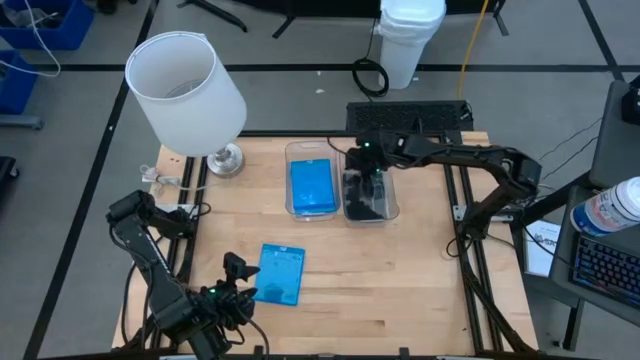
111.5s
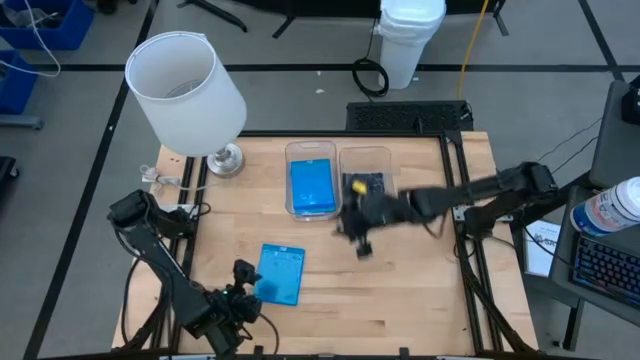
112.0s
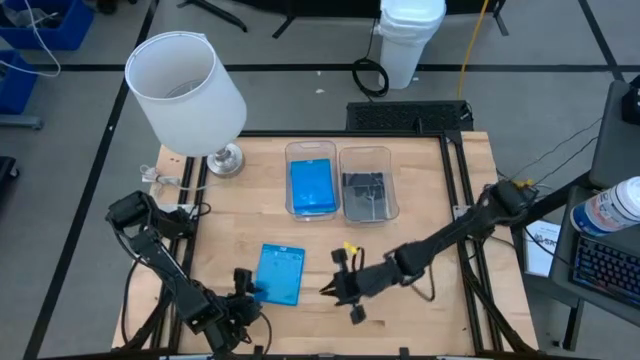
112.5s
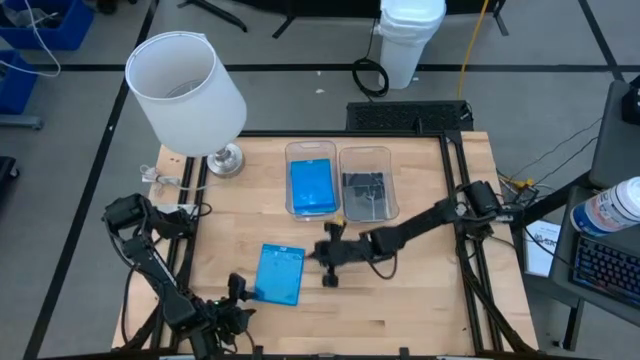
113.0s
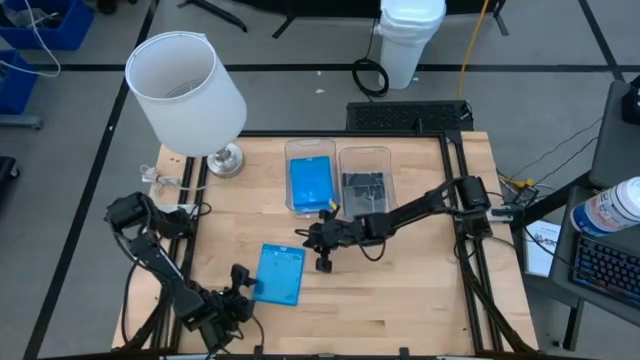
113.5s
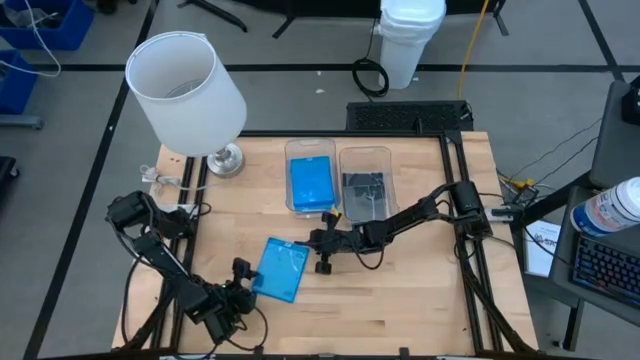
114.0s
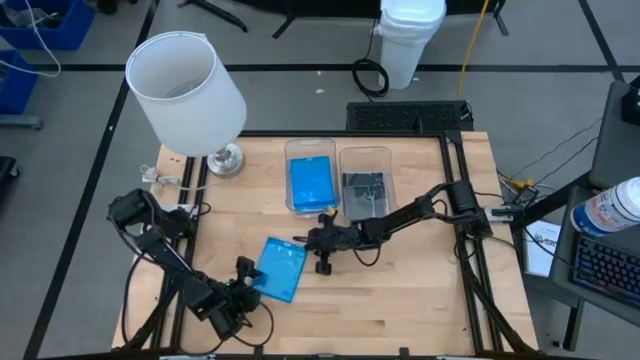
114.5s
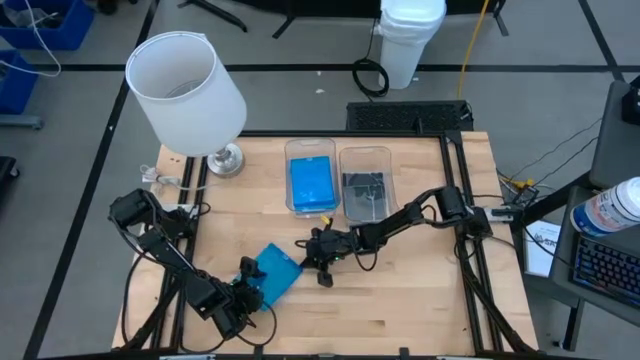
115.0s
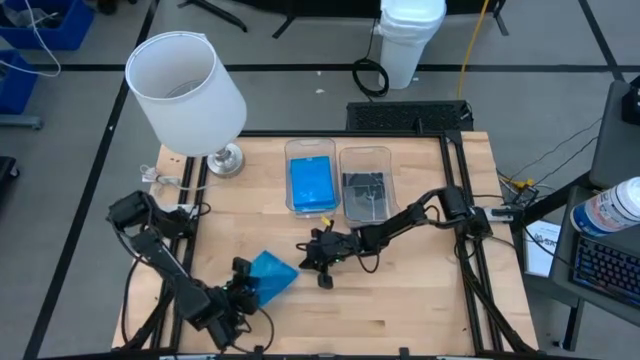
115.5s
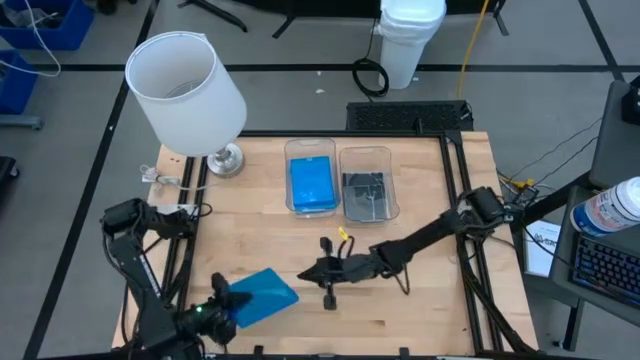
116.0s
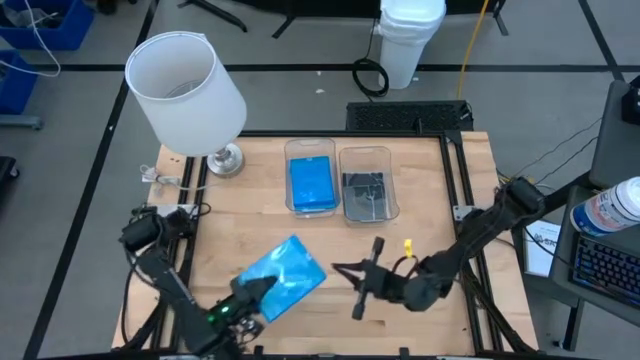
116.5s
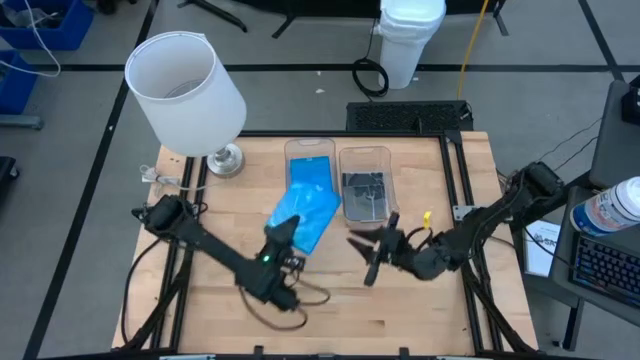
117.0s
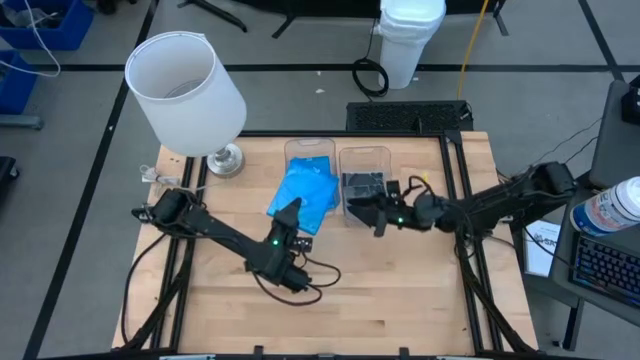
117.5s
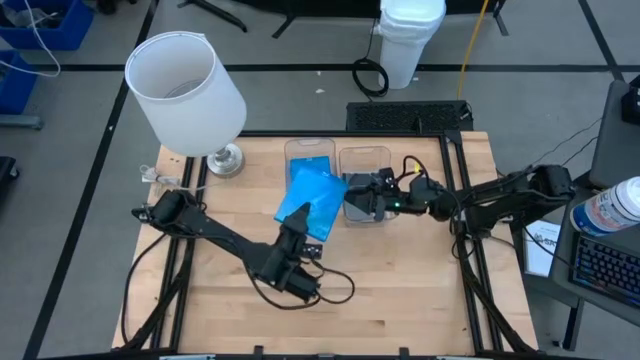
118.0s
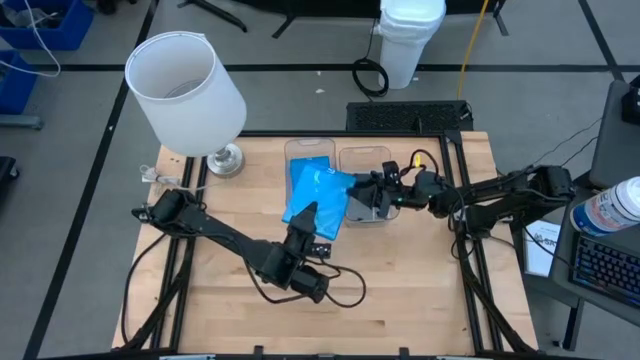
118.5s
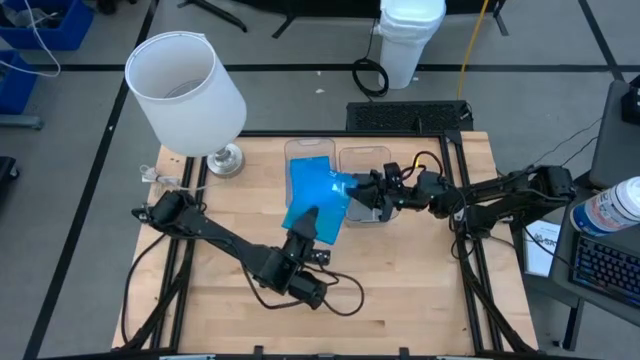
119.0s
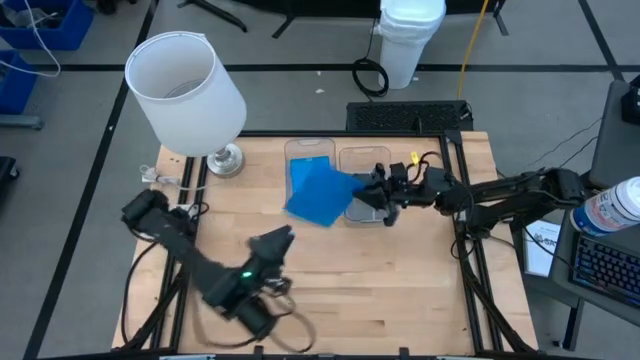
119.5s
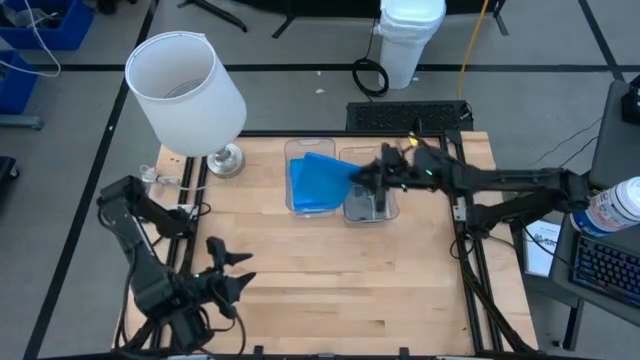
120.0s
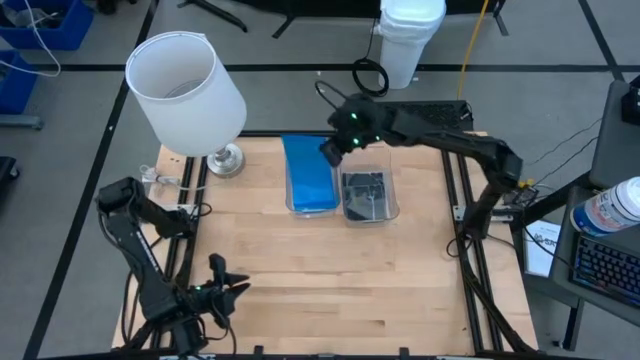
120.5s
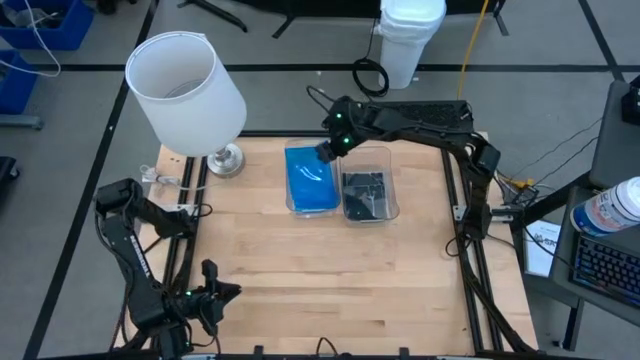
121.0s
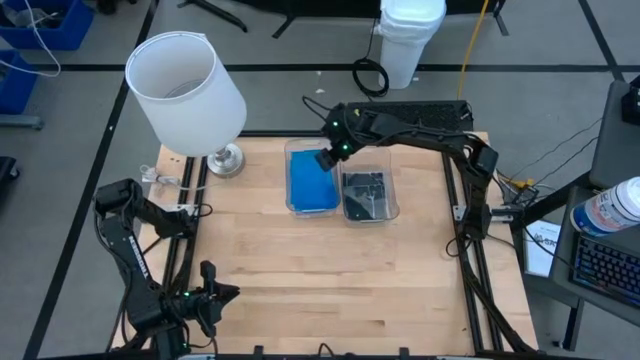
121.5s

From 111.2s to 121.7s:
Task: Pick & place jewel cases by type
Stack the blue CD case on top of the blue CD cases in the left transparent bin

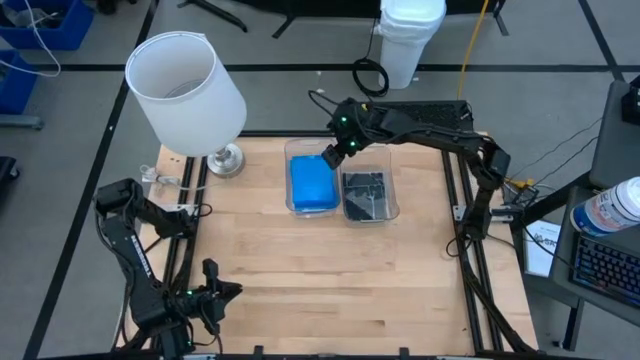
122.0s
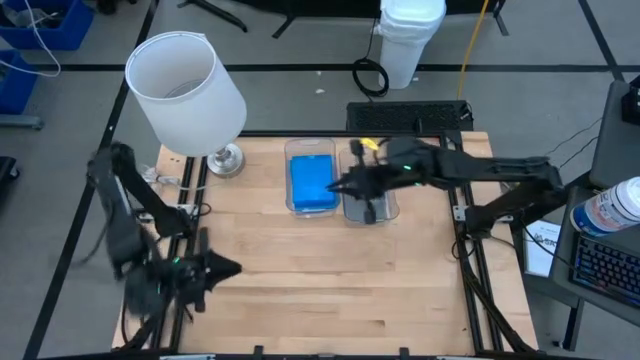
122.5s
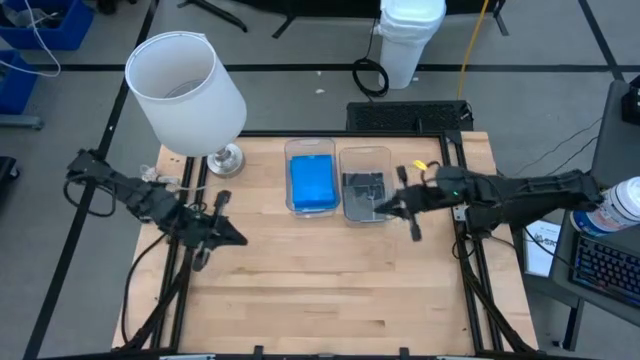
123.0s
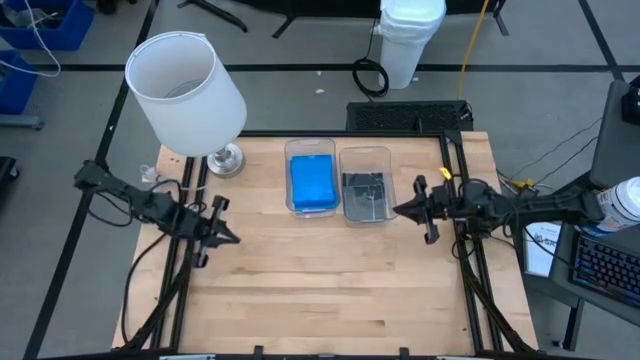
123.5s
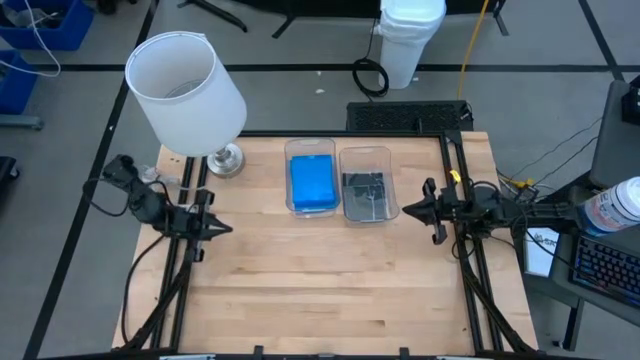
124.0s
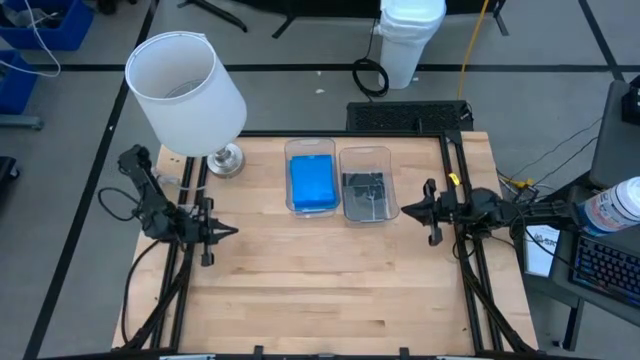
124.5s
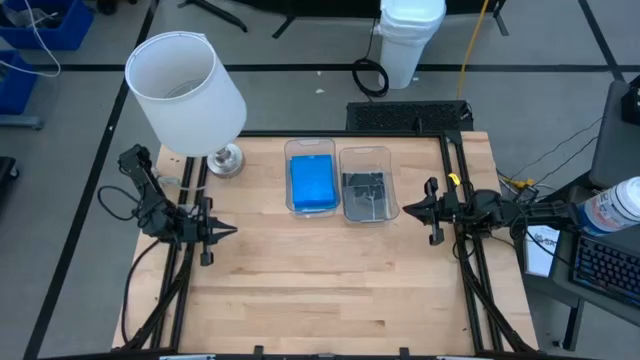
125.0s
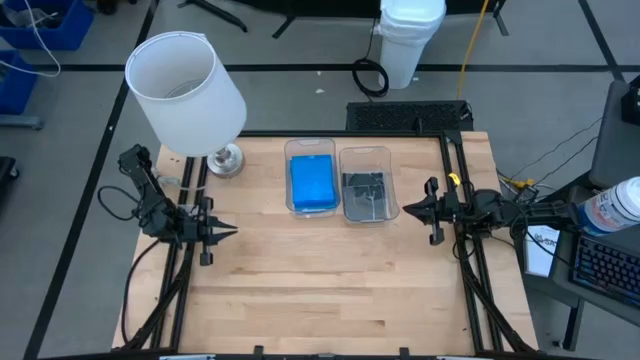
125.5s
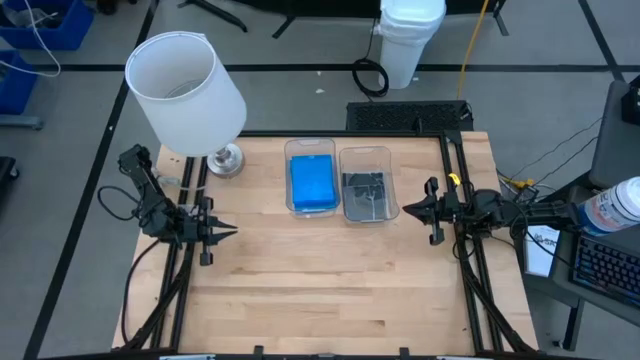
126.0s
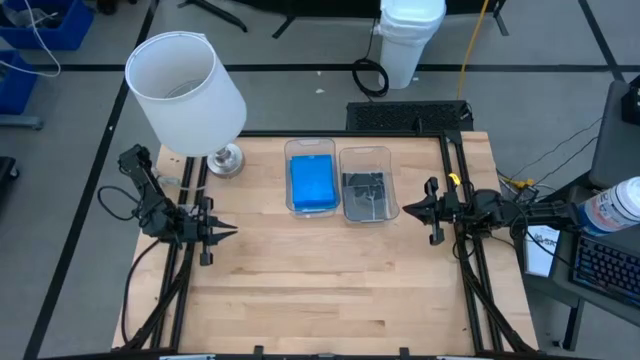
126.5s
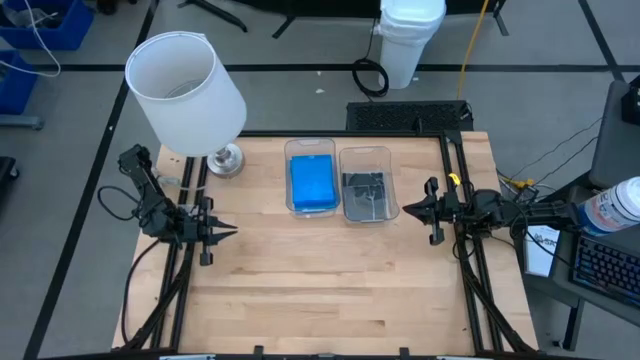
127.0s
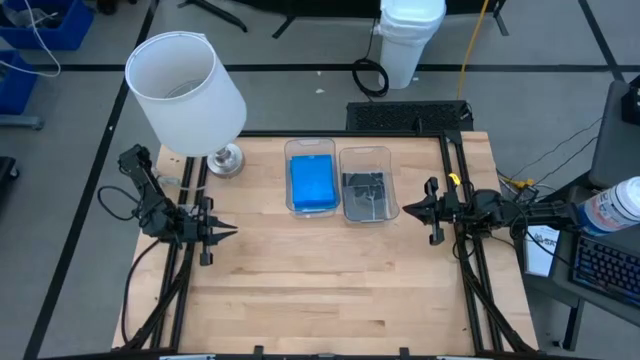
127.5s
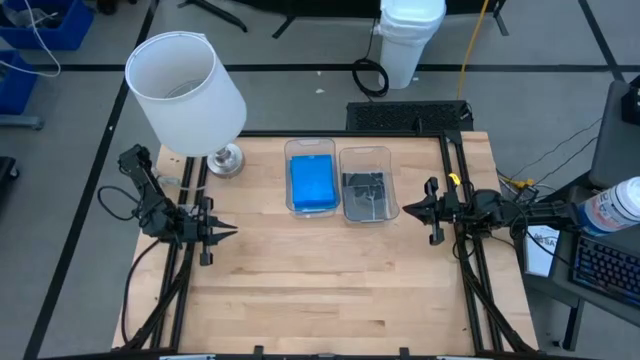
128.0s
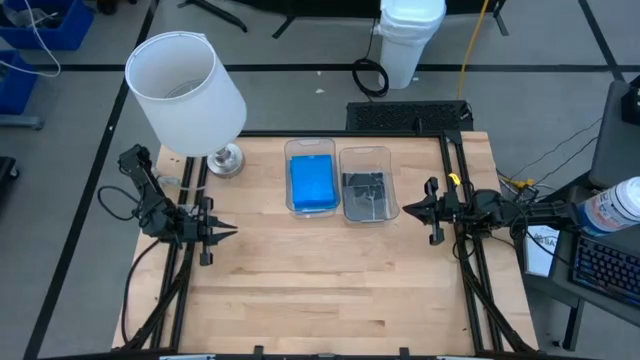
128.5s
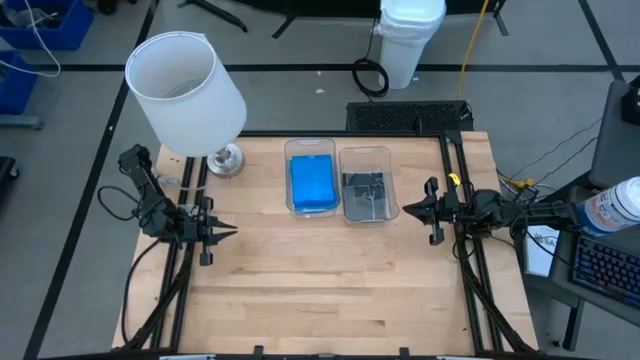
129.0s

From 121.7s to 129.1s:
Return to Home Position

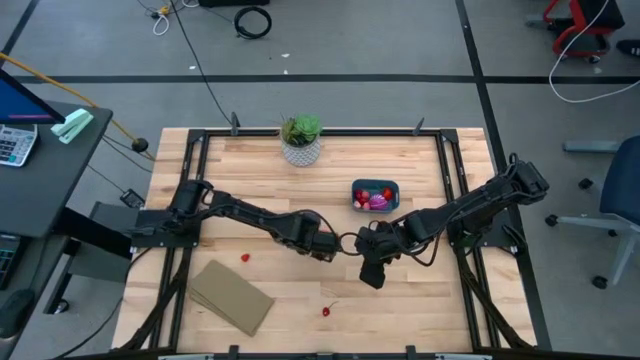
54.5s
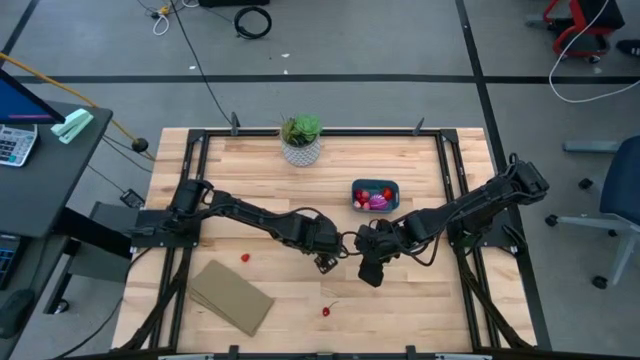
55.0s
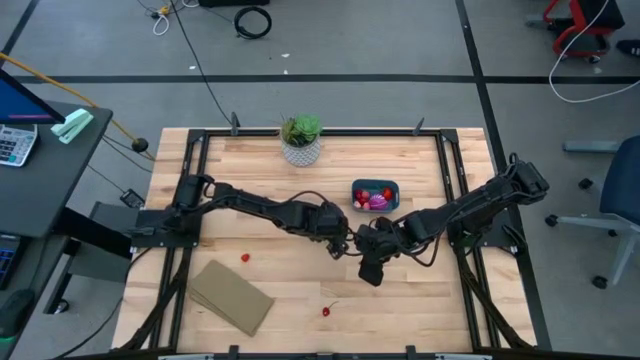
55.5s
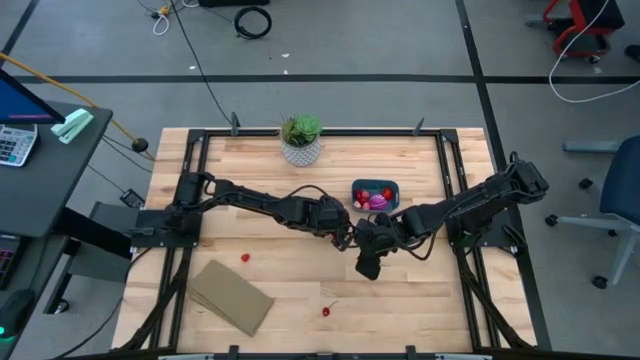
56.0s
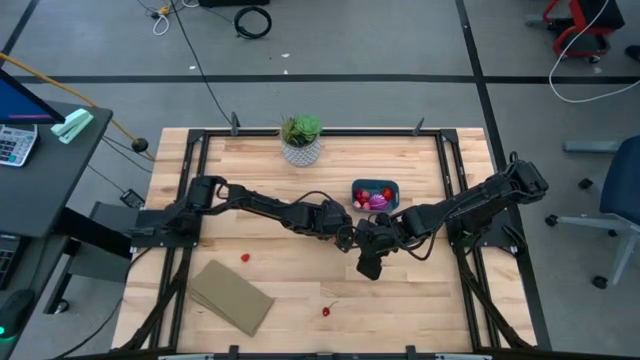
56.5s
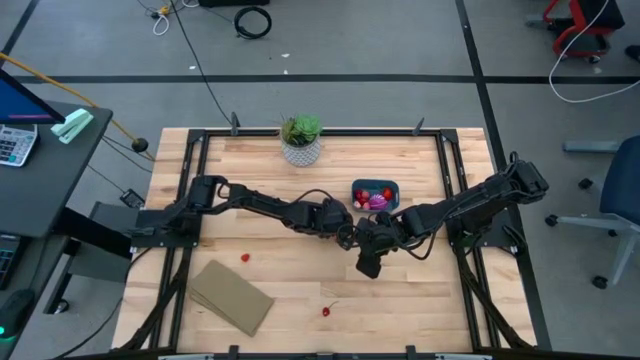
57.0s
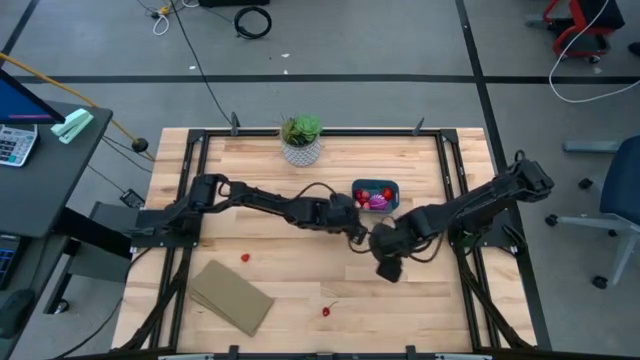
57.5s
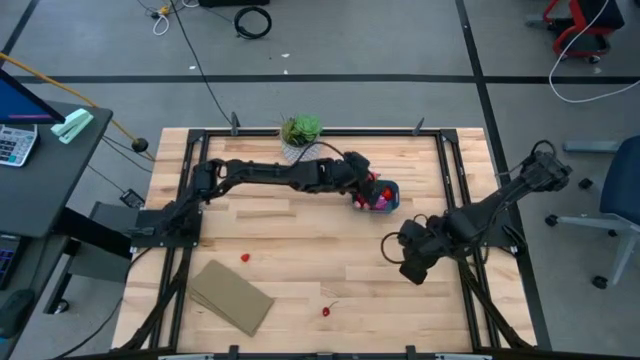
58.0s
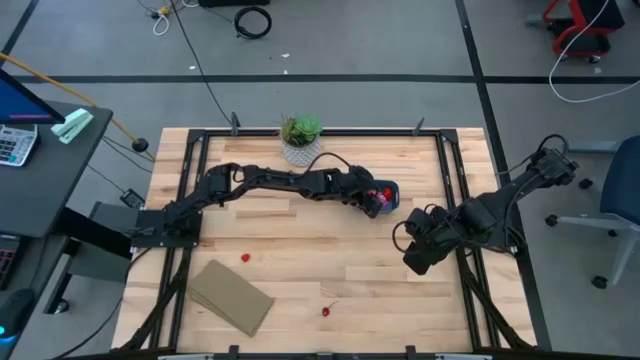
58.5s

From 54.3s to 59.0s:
Task: Pick and placing Produce into tupperware
Put the red dragon fruit into the blue bin
